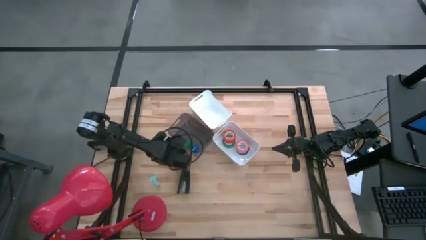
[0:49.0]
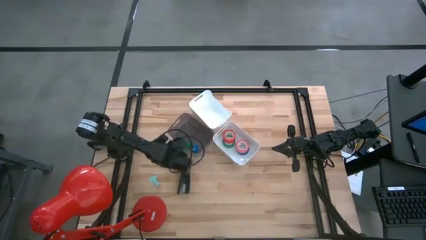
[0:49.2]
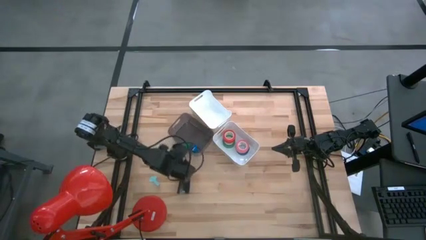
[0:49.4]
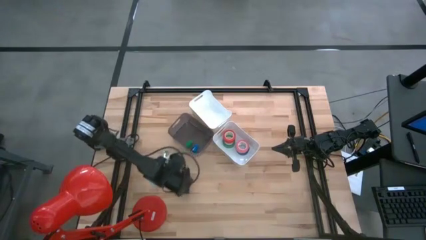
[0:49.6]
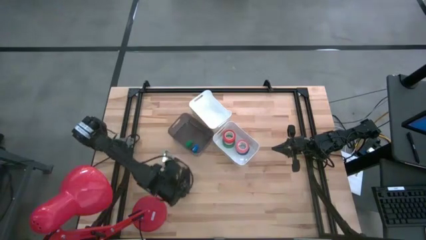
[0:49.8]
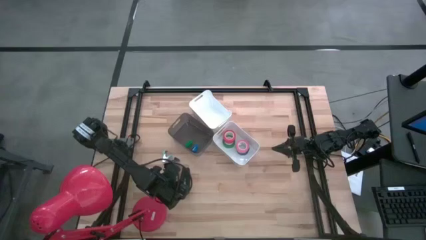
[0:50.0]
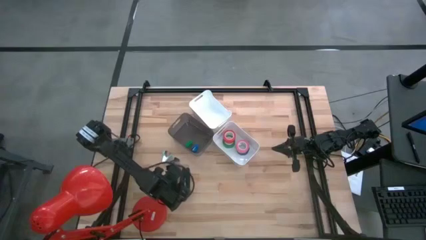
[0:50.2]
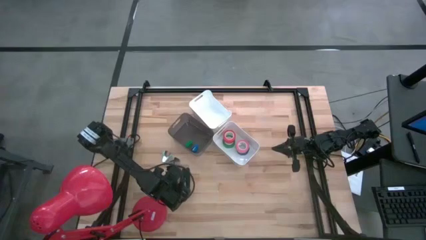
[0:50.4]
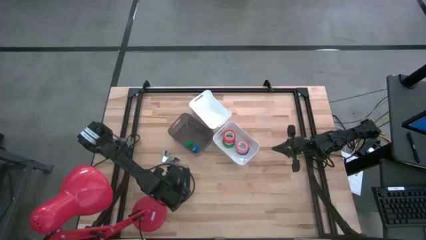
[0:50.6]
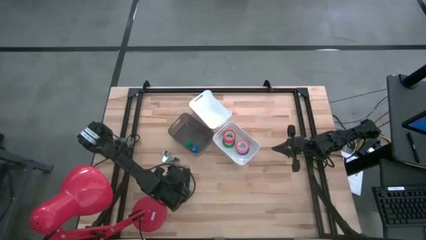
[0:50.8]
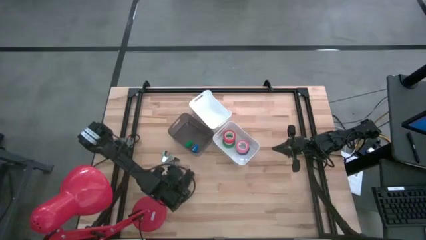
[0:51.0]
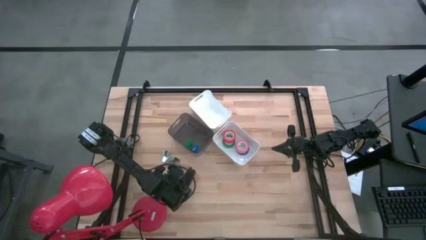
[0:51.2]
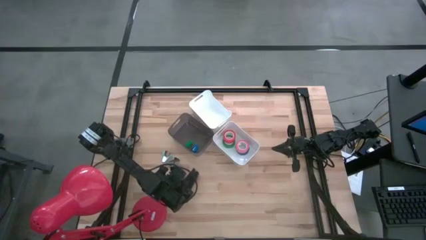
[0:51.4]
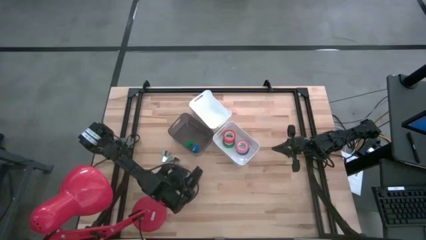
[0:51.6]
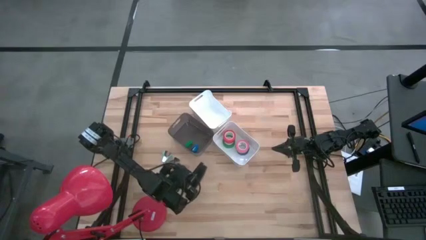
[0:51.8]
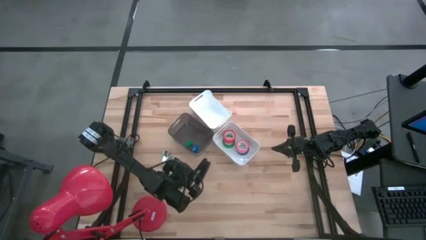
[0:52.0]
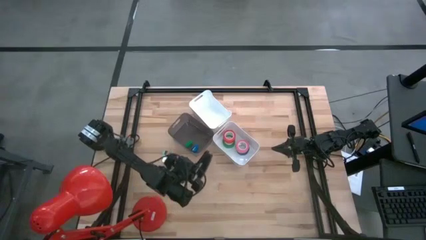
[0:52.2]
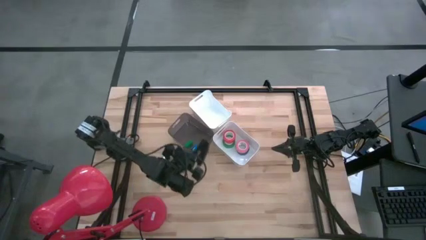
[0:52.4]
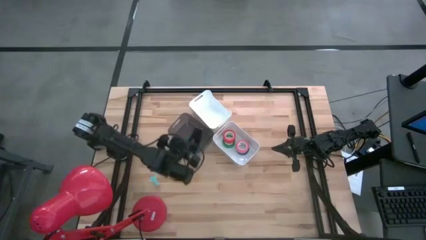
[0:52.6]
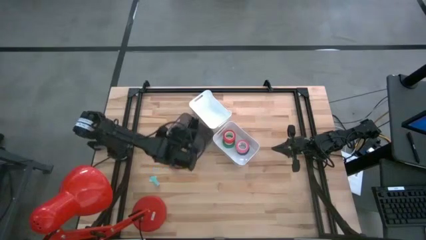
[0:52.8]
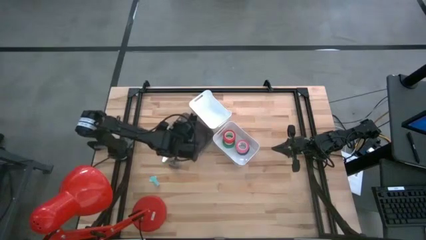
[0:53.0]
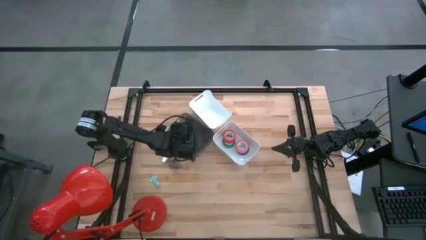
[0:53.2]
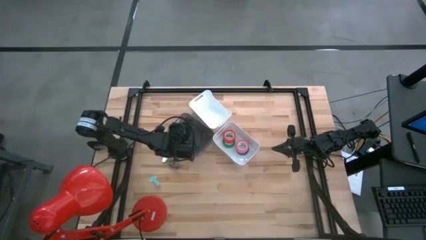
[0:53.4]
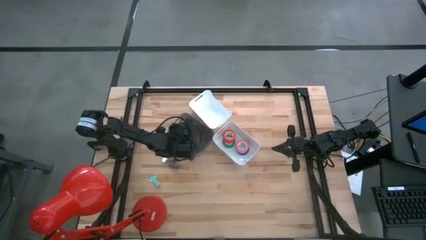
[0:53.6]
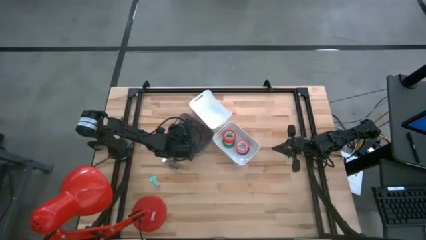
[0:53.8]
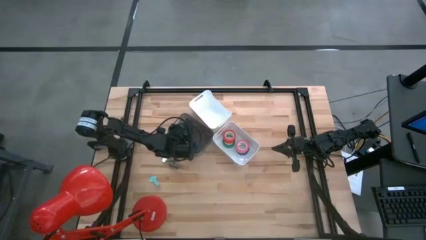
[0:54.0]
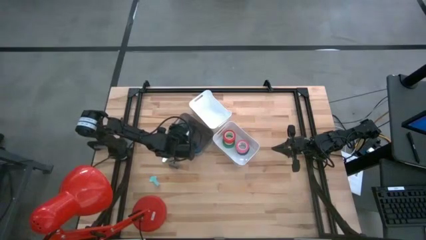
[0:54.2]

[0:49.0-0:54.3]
Task: Pick and place Stapler, Stapler remover, tape
Put the black stapler into the black bin

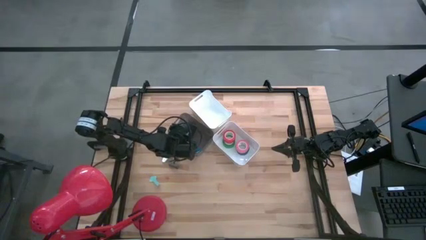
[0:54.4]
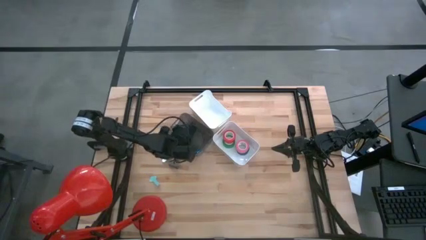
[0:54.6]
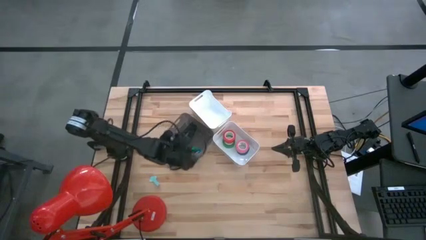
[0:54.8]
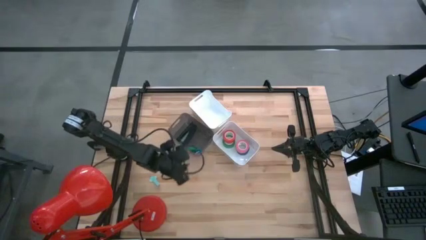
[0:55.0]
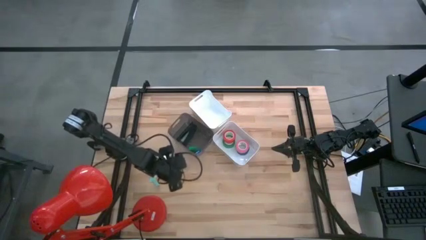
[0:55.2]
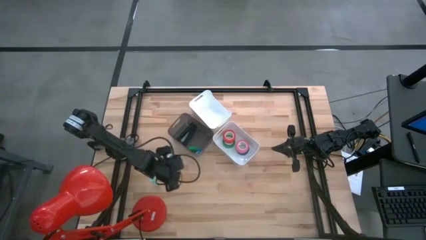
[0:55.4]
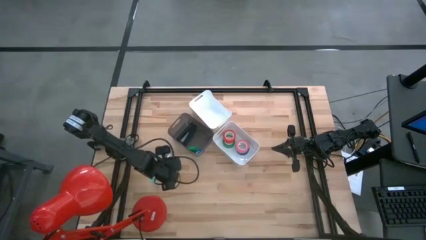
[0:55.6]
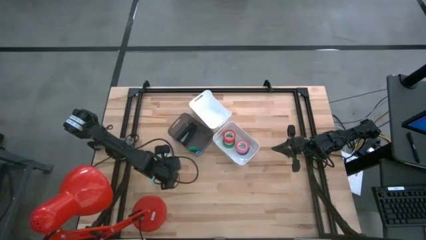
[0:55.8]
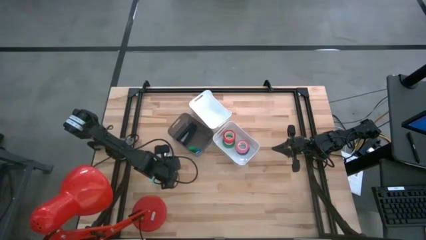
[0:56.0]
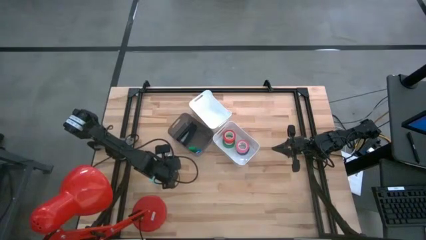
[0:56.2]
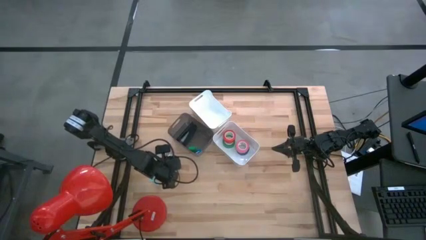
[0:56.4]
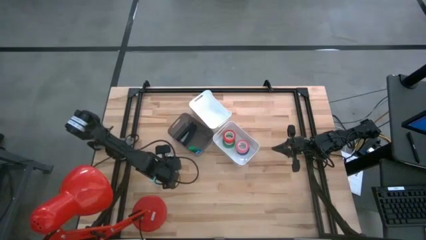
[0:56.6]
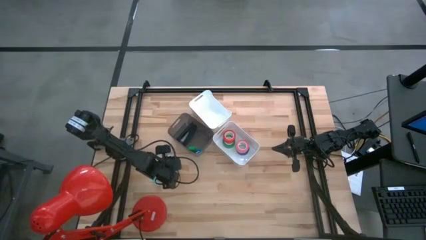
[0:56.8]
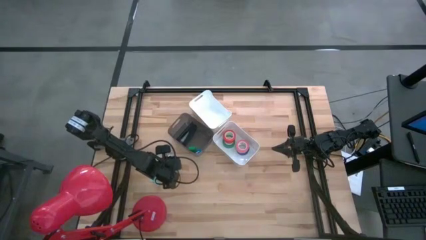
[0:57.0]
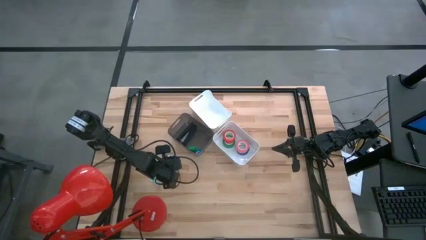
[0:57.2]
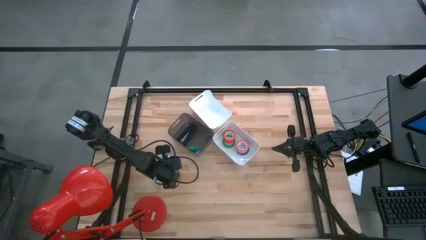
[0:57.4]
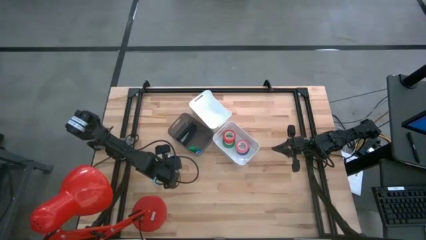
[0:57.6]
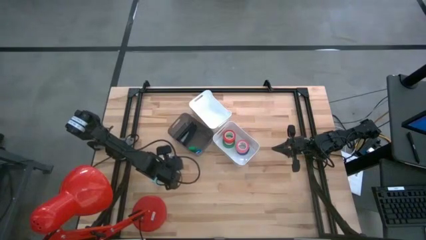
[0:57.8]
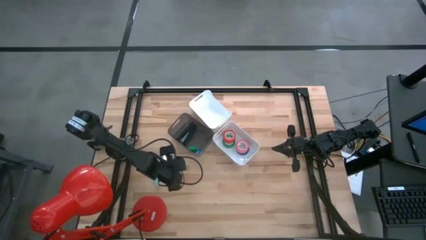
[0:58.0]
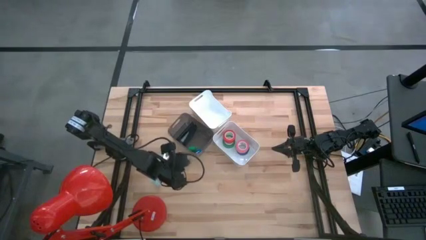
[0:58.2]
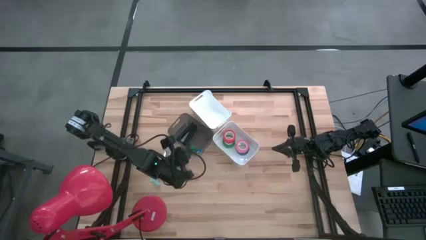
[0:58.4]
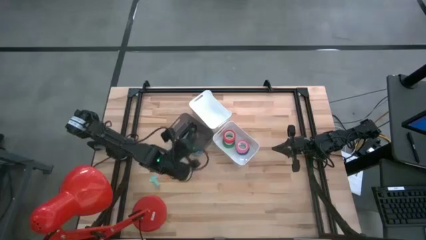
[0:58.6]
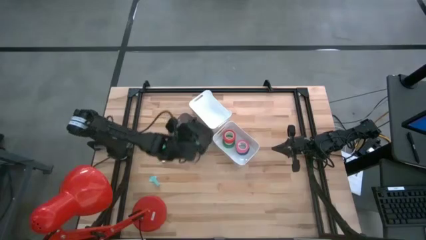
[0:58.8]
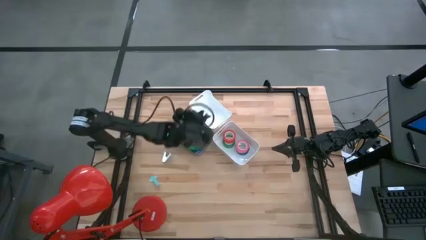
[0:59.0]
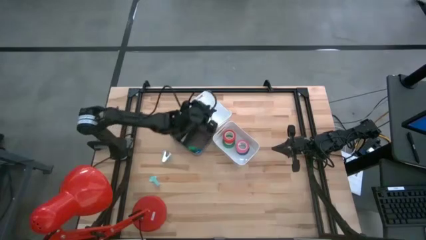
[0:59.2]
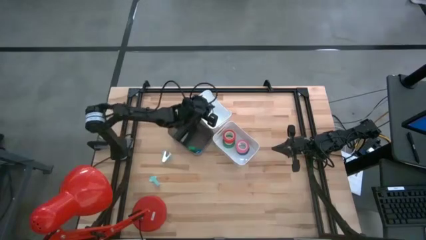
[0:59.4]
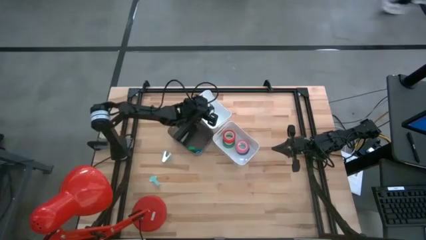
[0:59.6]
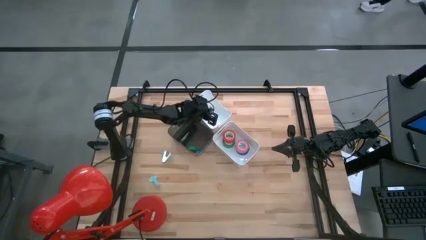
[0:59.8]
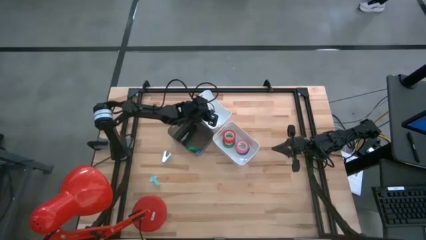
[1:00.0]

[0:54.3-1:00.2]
Put the black staple remover into the top white bin

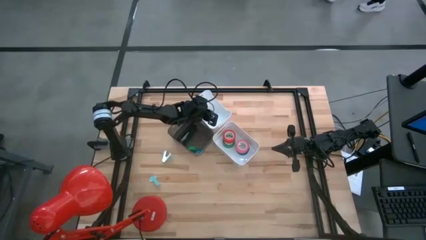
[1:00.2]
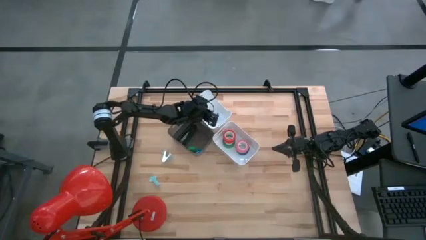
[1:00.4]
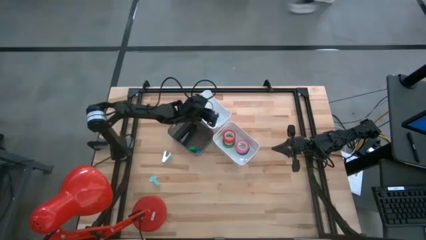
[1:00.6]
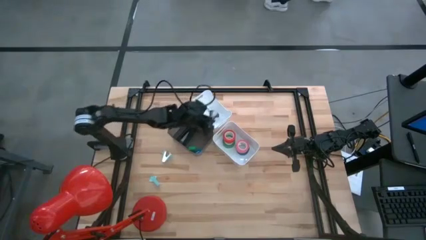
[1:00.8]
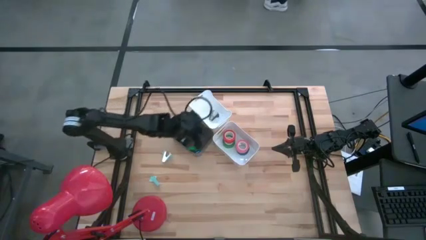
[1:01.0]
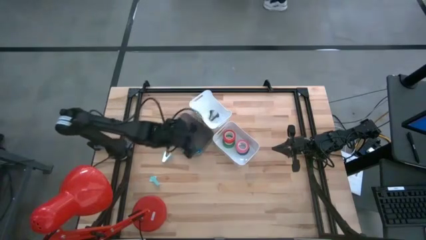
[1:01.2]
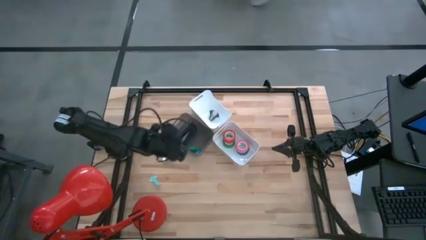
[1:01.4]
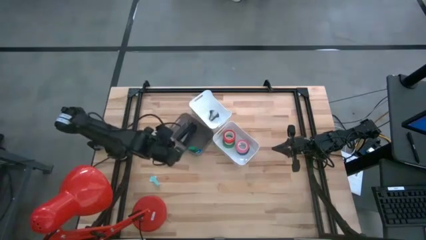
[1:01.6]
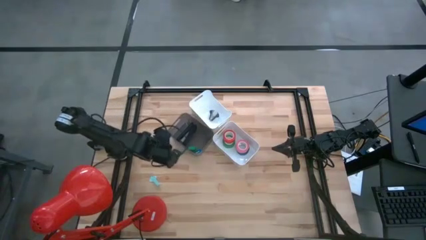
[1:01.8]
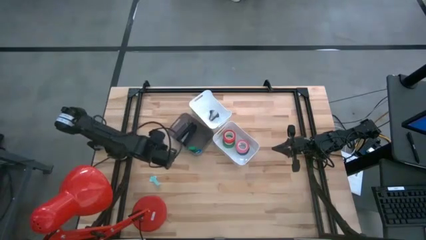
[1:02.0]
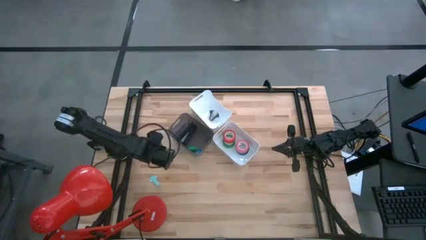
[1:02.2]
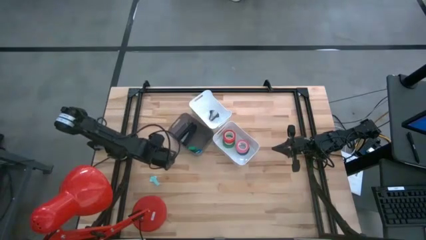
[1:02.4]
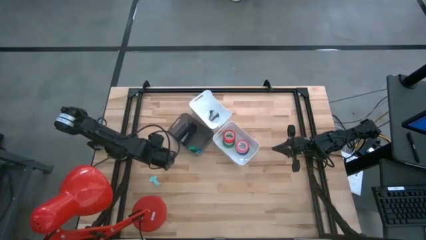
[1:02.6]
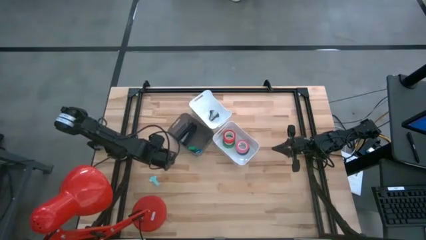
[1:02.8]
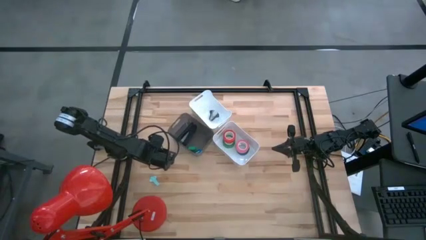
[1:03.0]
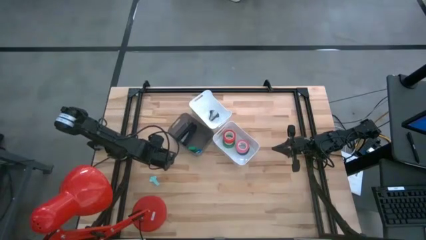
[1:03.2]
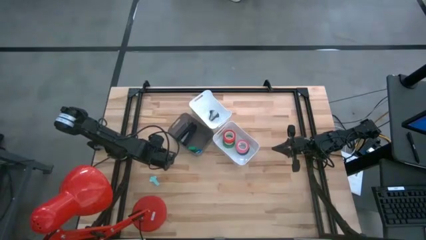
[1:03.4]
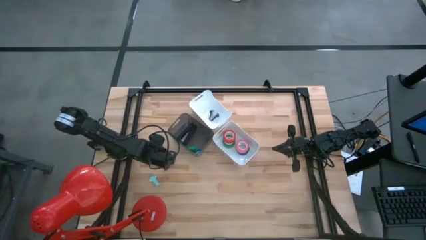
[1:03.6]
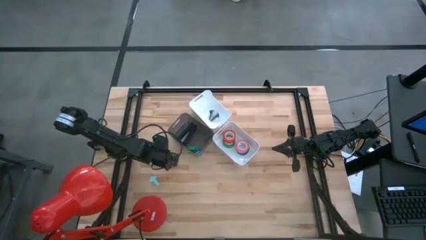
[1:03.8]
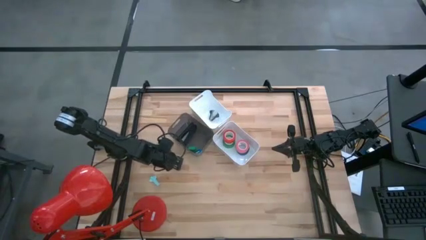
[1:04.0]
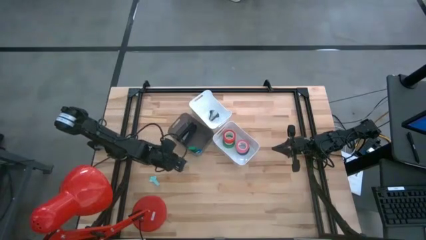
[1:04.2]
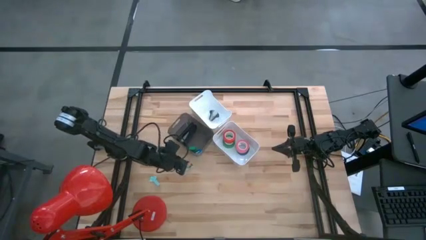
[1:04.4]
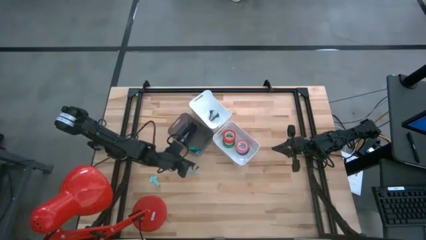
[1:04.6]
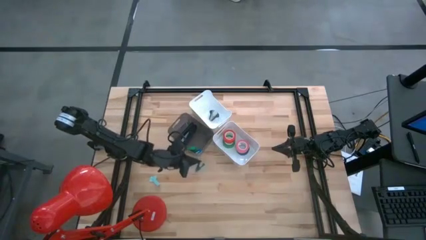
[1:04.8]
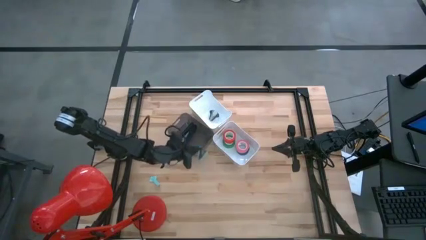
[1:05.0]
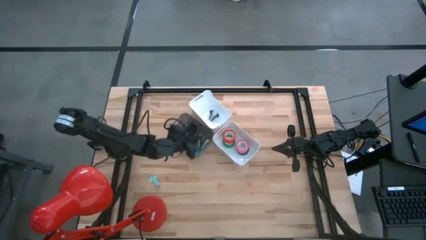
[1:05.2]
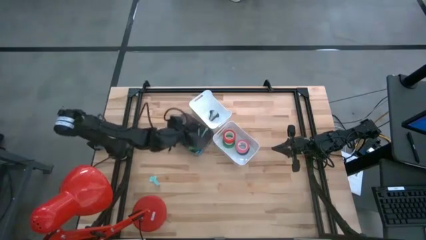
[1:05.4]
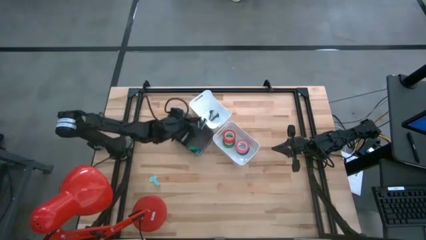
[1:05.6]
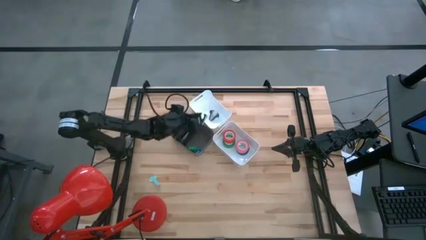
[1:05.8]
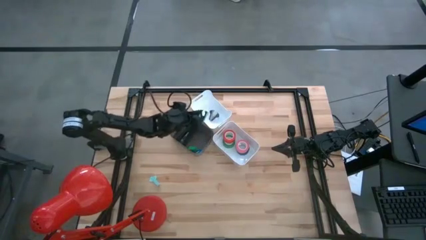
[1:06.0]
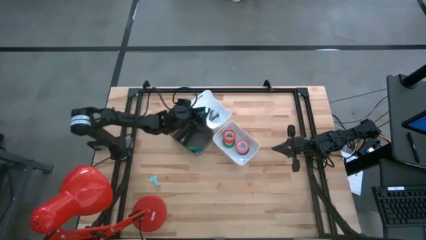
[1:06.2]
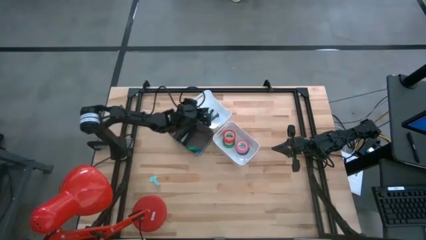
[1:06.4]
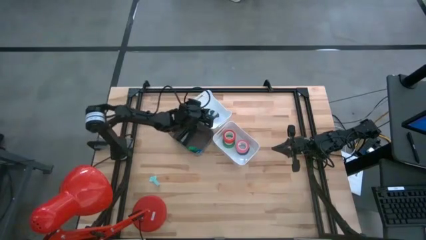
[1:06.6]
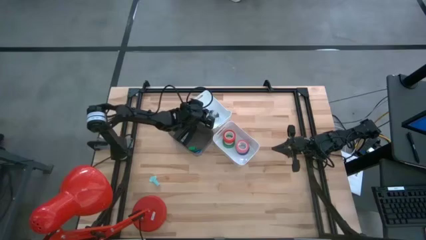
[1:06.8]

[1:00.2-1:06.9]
Put the top light blue staple remover into the top white bin
